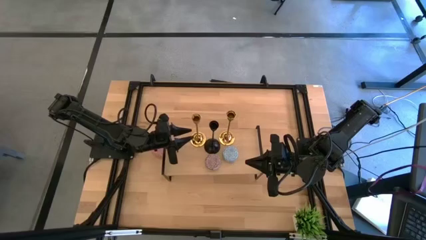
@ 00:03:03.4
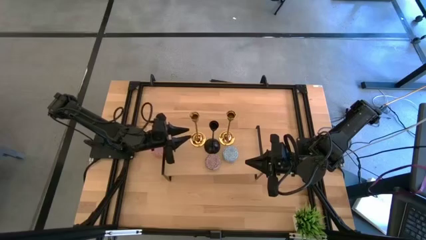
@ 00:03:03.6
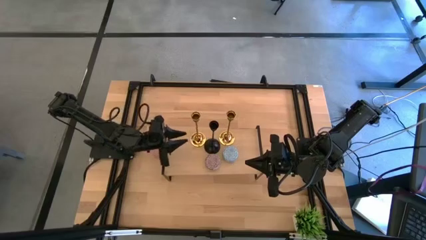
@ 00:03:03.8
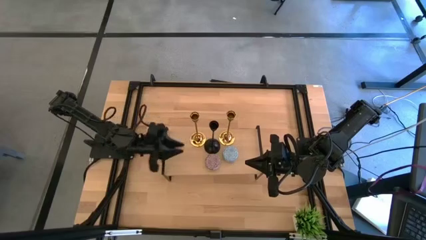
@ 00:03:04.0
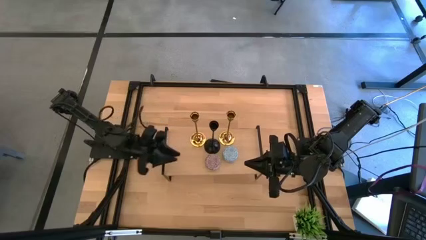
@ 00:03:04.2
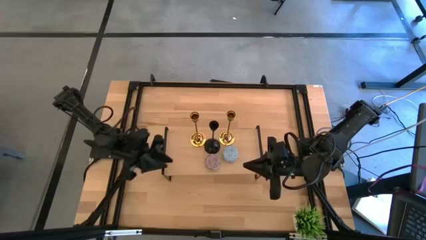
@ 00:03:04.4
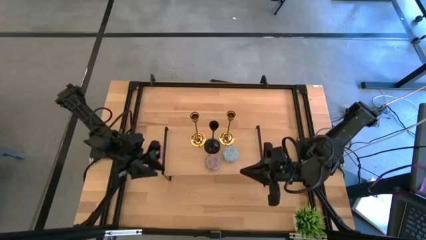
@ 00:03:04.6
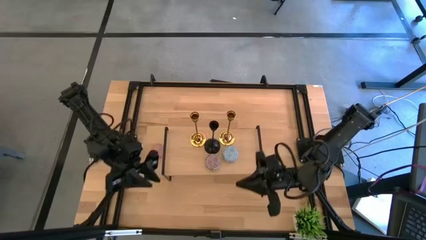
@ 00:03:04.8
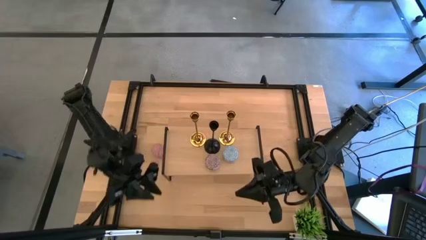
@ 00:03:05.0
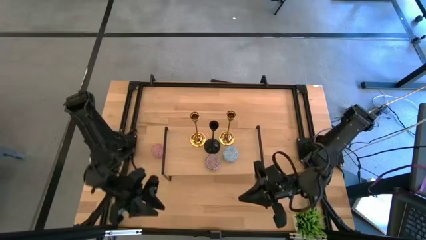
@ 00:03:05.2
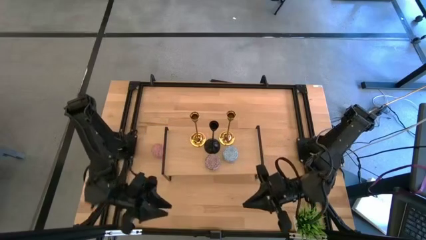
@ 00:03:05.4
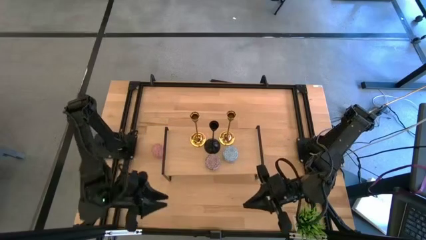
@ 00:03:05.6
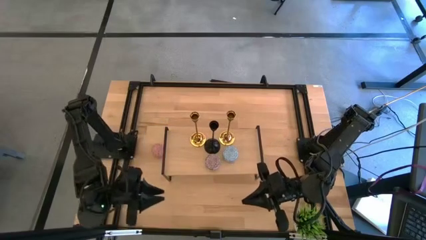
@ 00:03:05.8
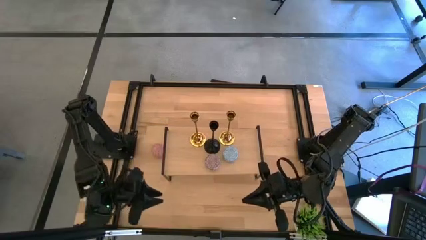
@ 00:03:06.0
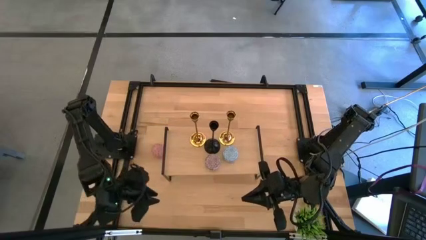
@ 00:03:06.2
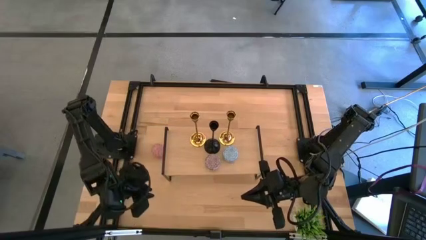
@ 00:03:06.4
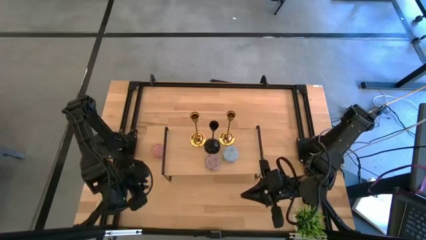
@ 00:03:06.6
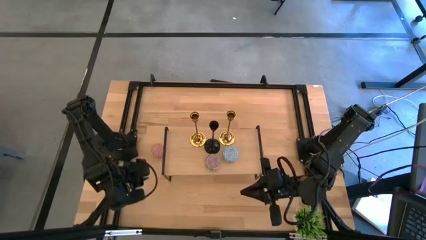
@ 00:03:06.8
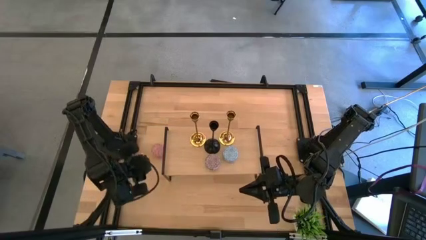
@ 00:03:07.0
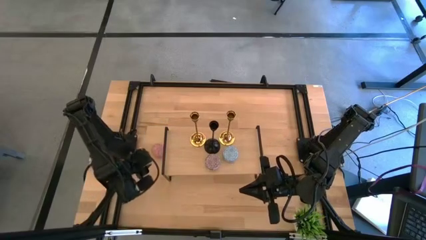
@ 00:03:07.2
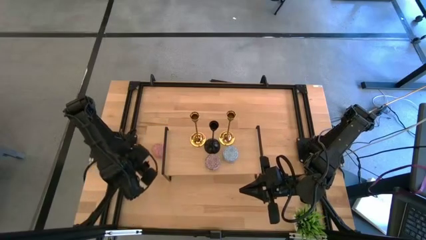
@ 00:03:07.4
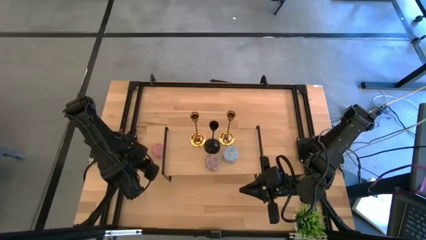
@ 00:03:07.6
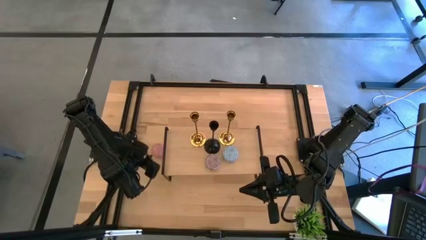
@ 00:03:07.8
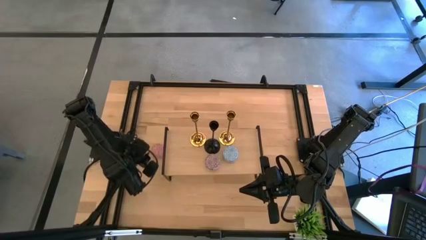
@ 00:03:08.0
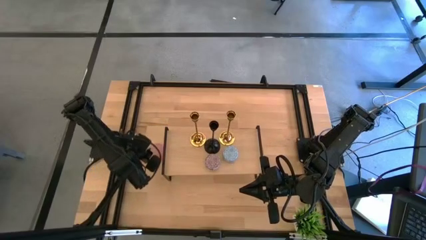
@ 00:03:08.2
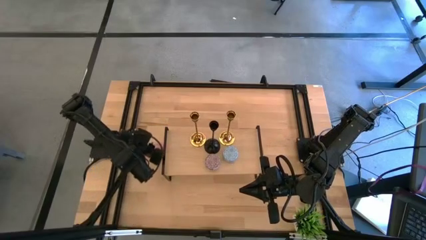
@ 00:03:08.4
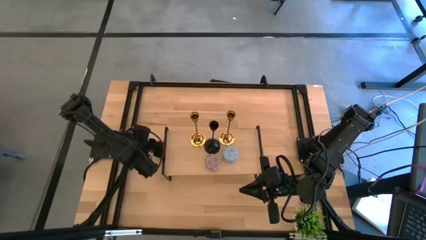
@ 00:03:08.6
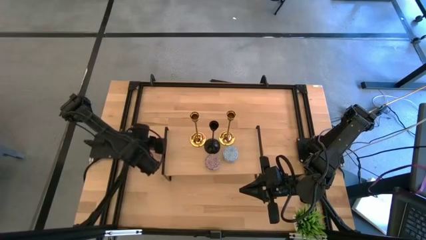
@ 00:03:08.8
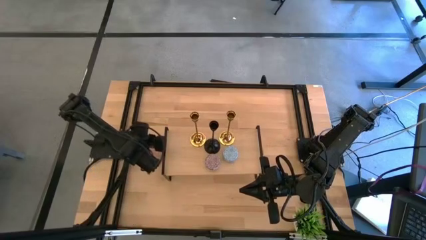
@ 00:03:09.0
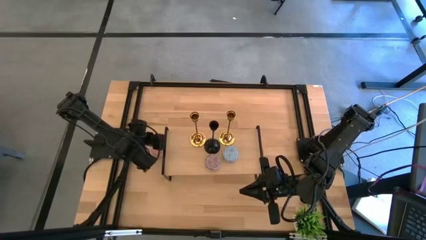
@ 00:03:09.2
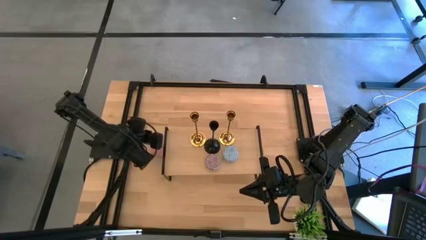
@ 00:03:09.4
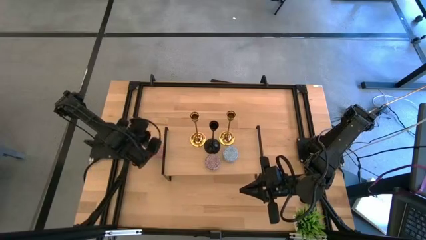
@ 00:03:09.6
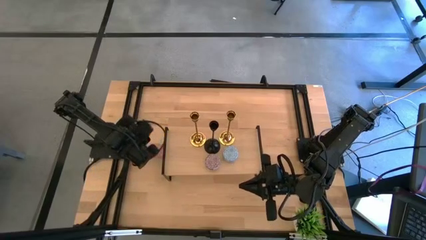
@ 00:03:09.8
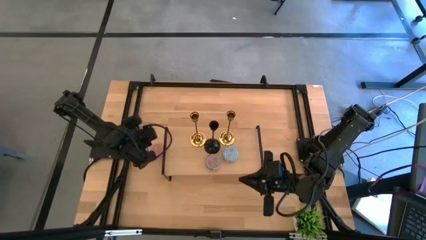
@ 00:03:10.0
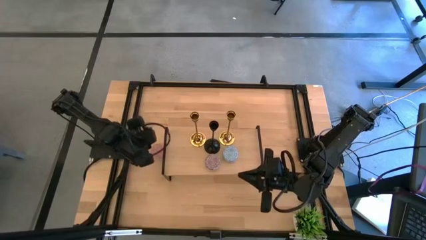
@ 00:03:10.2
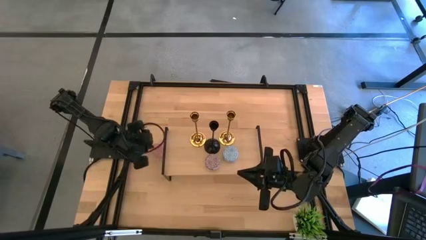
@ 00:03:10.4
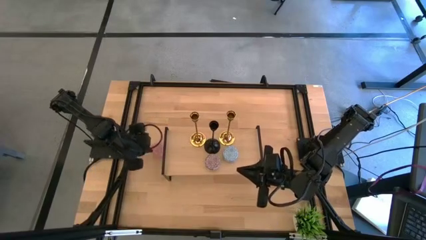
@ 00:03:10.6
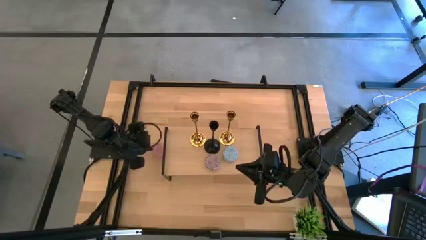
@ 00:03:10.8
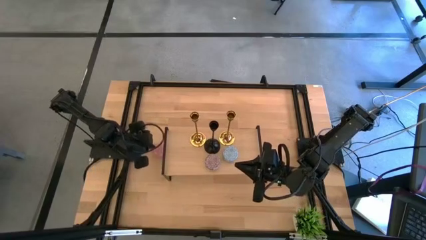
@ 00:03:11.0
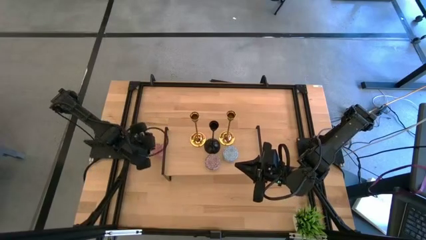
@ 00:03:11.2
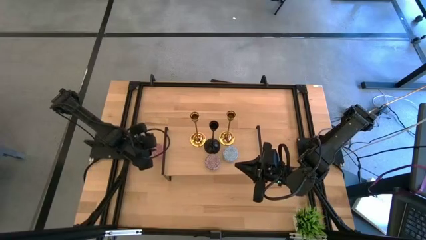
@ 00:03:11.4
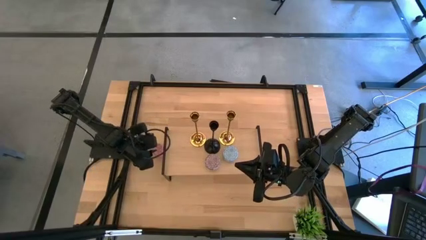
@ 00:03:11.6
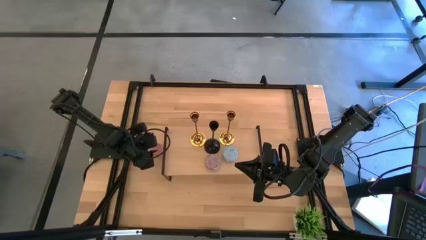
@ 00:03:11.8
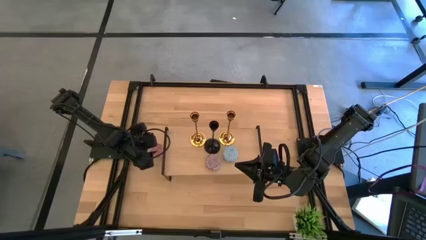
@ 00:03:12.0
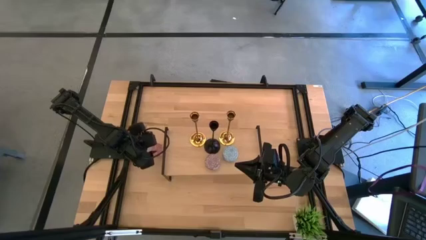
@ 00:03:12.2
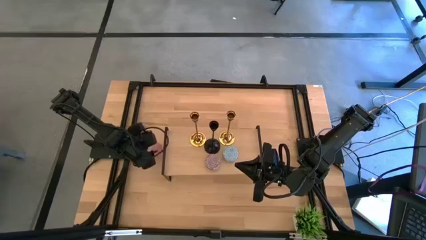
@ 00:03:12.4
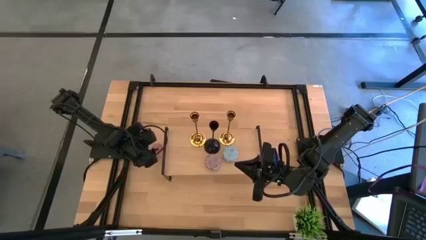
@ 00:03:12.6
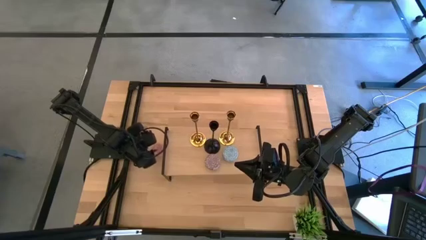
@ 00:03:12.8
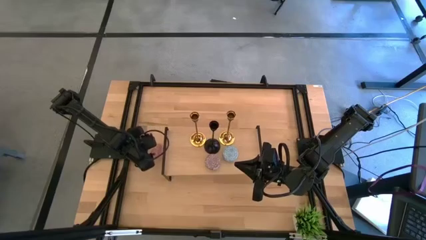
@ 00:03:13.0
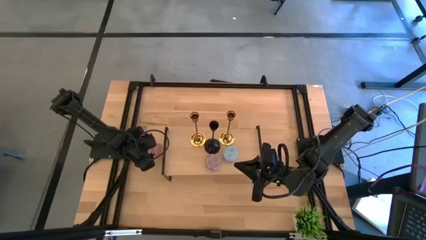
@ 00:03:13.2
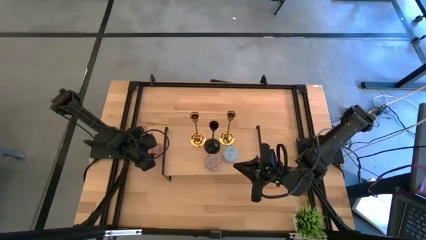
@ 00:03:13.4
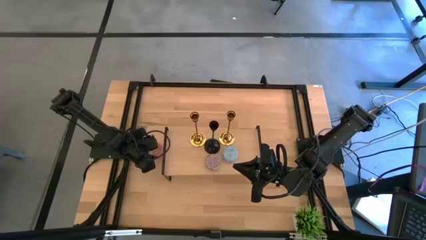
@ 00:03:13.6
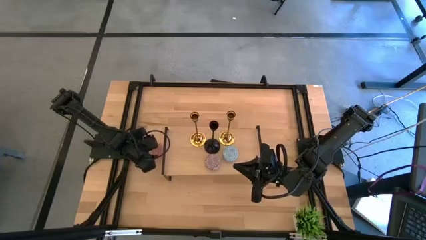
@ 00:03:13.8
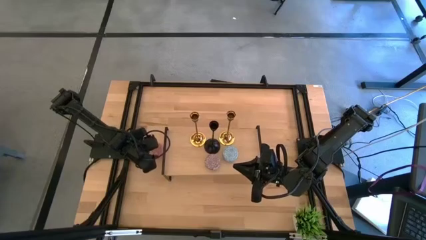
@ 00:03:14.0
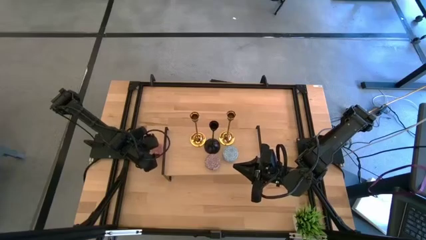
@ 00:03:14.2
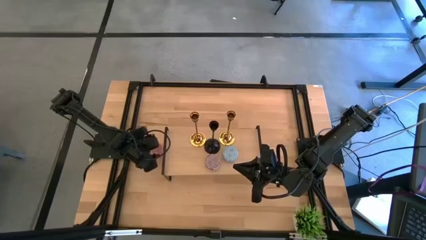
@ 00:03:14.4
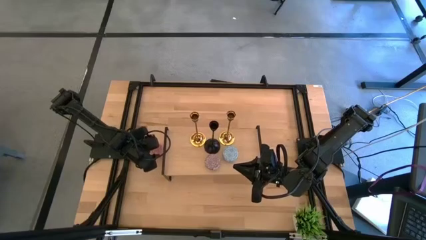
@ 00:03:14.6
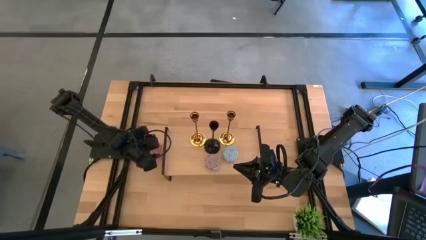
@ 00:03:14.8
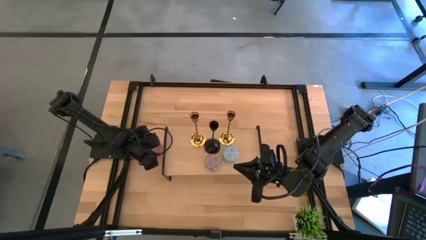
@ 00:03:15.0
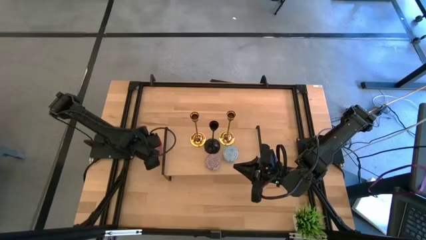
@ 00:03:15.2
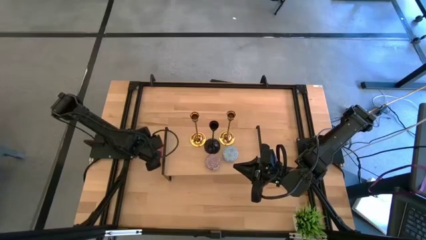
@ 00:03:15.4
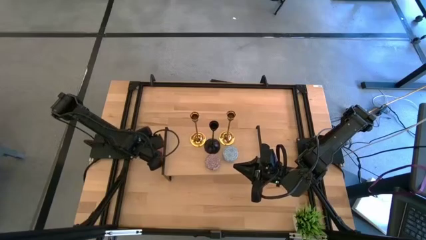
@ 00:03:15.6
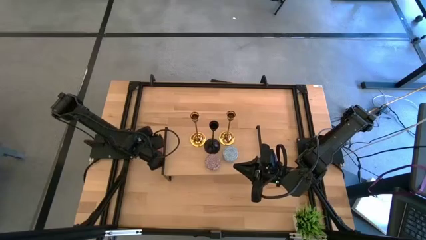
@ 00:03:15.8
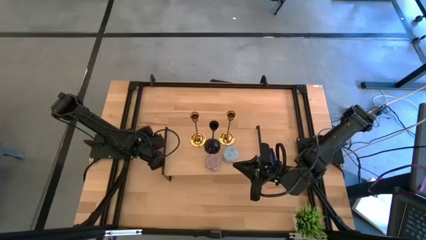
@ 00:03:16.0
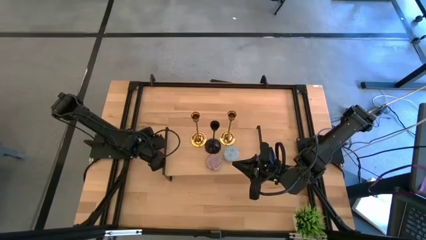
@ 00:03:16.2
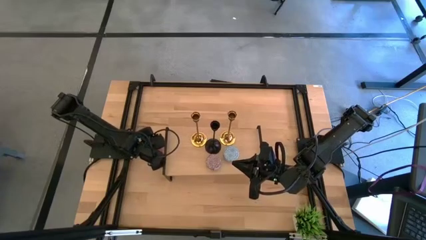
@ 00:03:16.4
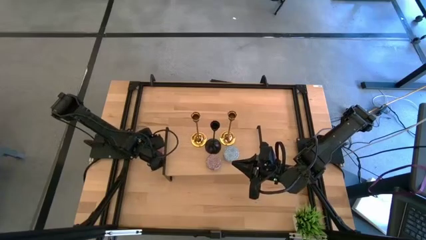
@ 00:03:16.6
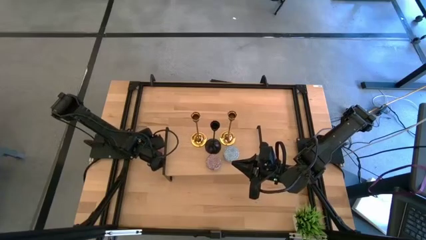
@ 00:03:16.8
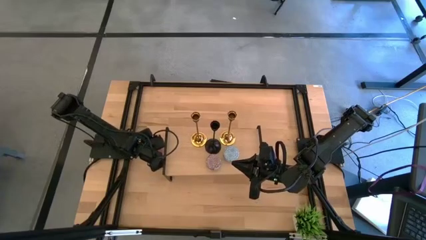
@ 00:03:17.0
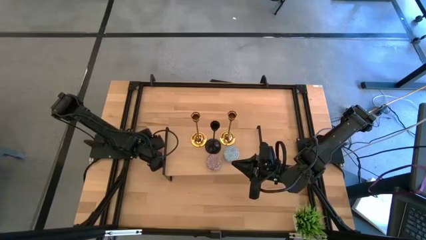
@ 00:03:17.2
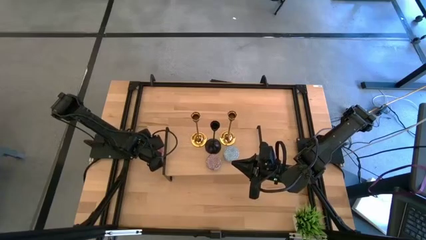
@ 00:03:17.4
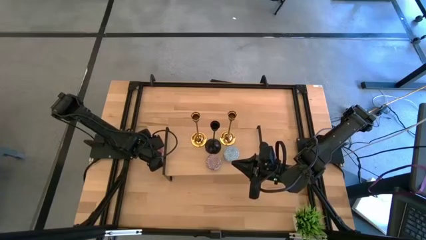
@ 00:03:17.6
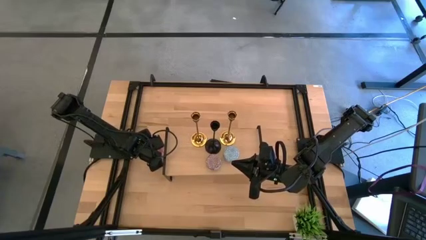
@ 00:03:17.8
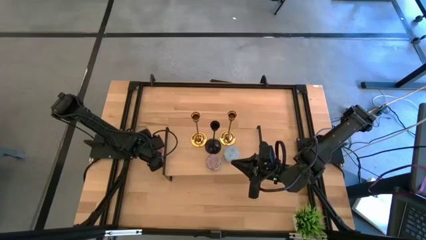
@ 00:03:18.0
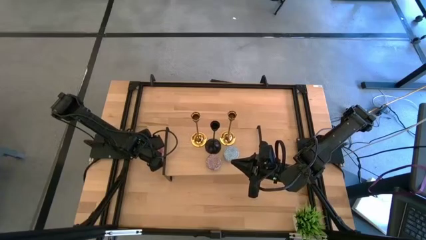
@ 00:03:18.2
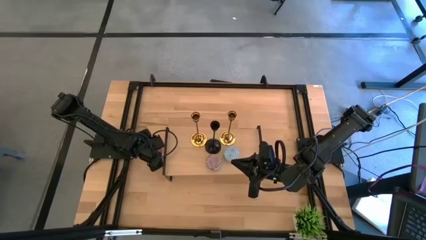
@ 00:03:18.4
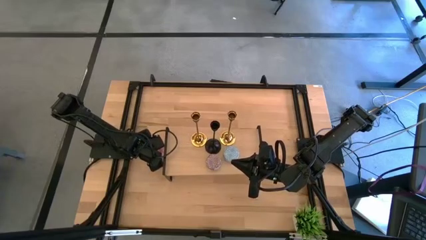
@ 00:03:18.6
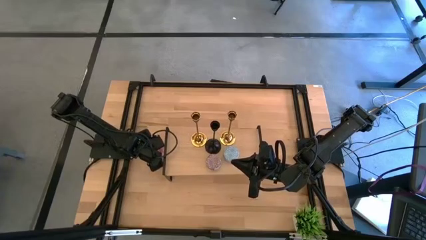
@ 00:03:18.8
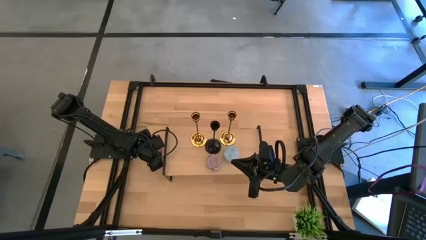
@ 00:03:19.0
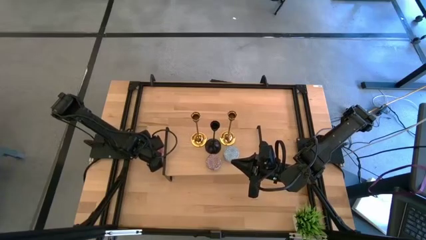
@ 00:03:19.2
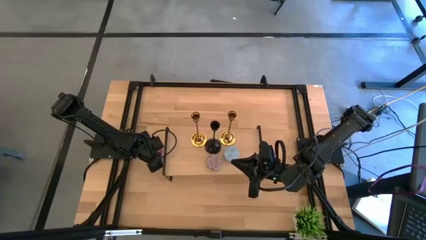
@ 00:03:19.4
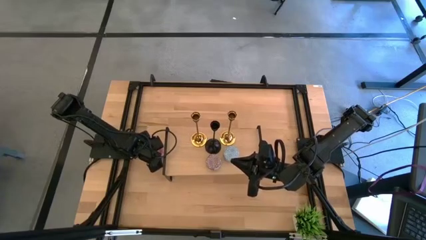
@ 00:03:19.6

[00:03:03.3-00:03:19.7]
Task: Pick & Place candle stick holders
Put the pink scented candle on the shelf
